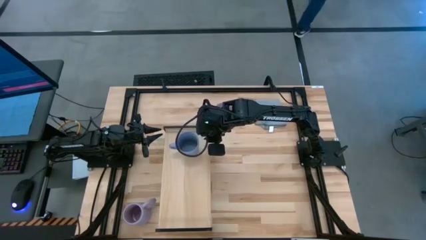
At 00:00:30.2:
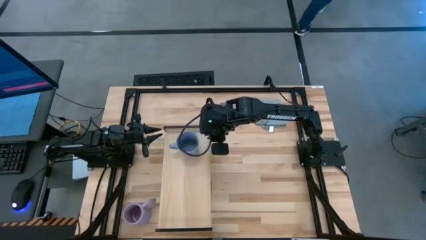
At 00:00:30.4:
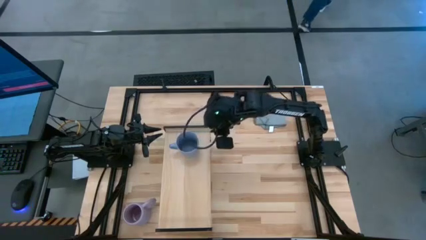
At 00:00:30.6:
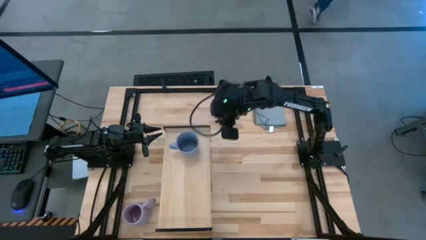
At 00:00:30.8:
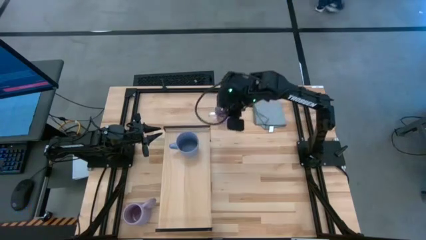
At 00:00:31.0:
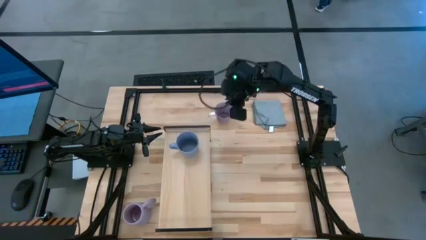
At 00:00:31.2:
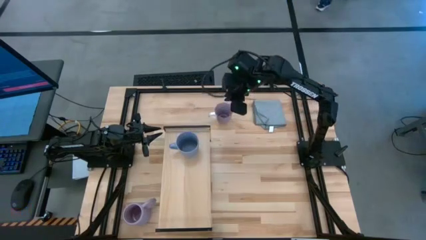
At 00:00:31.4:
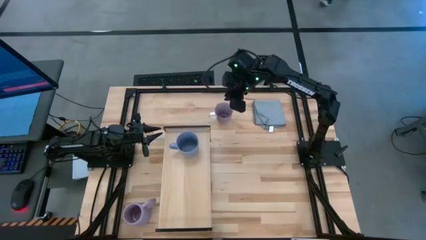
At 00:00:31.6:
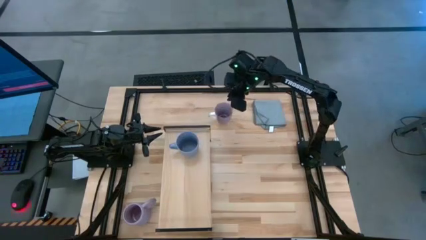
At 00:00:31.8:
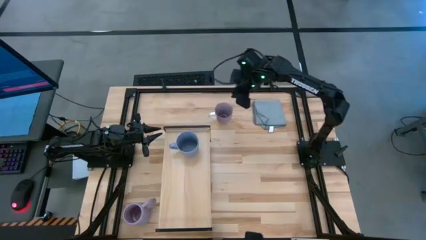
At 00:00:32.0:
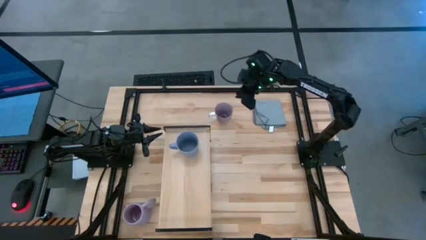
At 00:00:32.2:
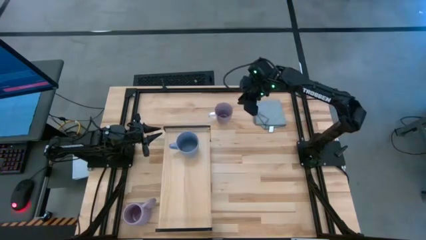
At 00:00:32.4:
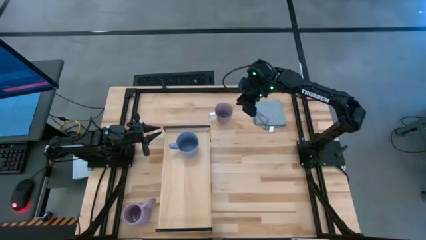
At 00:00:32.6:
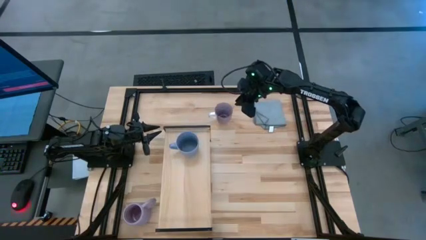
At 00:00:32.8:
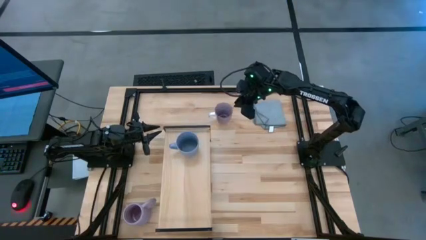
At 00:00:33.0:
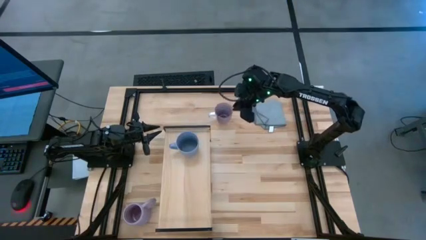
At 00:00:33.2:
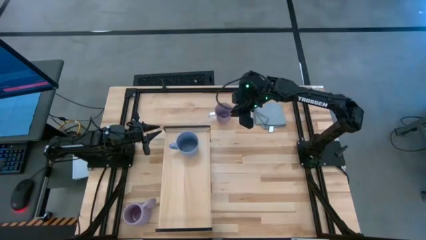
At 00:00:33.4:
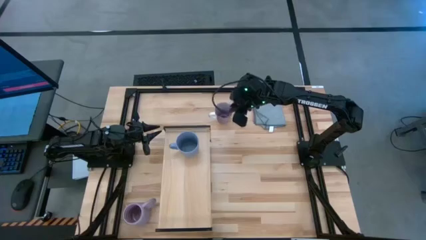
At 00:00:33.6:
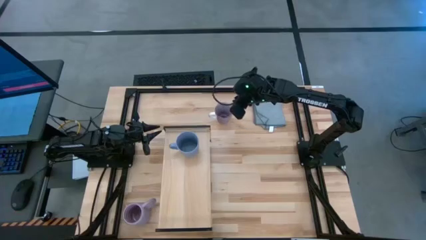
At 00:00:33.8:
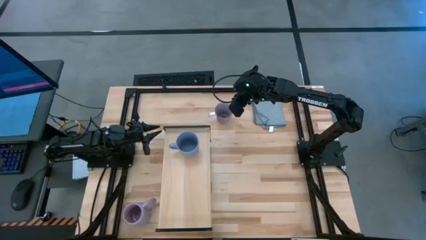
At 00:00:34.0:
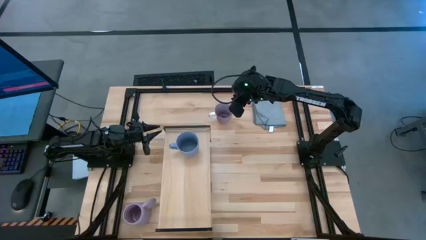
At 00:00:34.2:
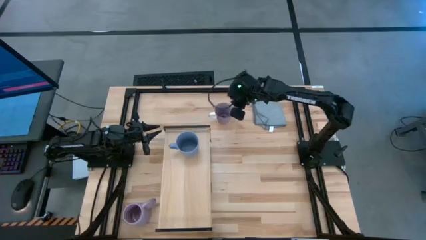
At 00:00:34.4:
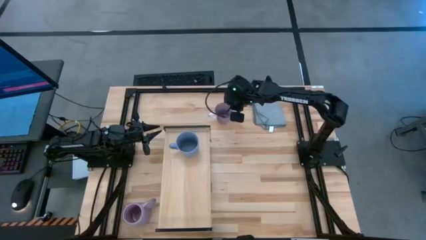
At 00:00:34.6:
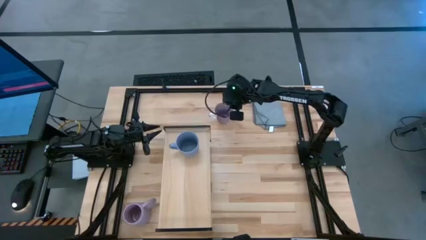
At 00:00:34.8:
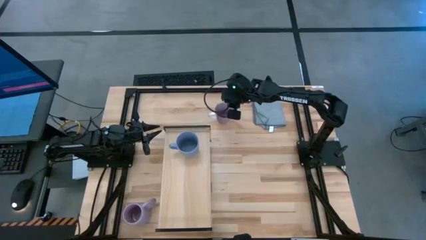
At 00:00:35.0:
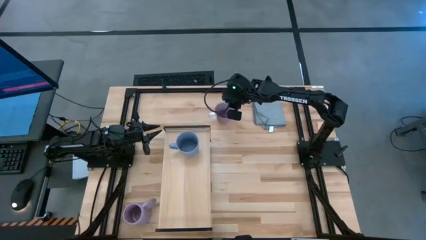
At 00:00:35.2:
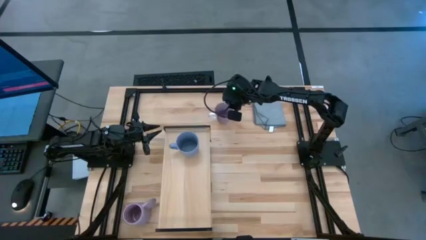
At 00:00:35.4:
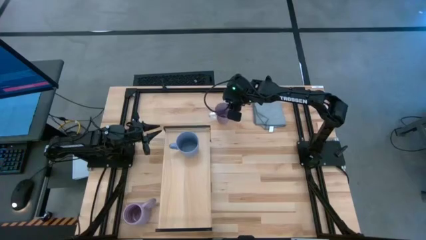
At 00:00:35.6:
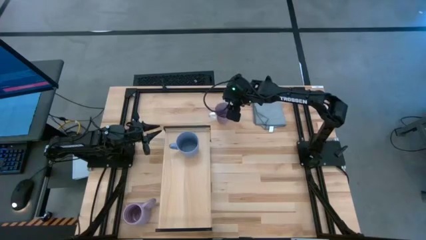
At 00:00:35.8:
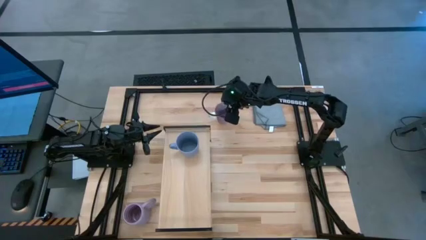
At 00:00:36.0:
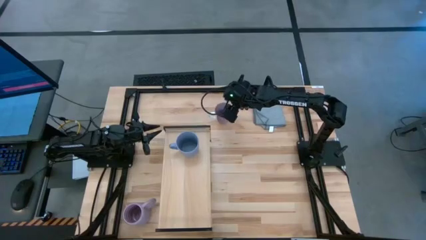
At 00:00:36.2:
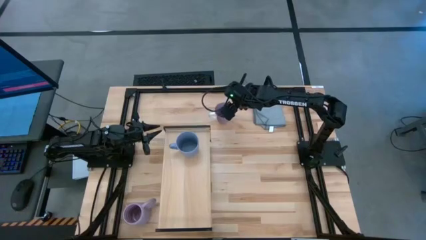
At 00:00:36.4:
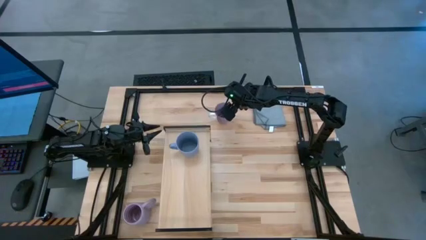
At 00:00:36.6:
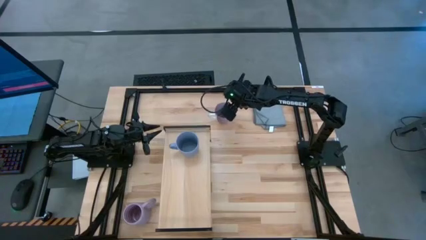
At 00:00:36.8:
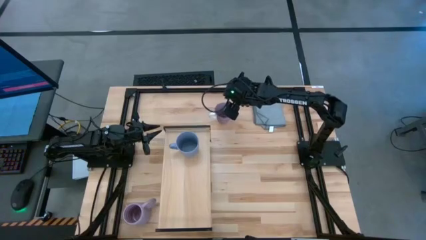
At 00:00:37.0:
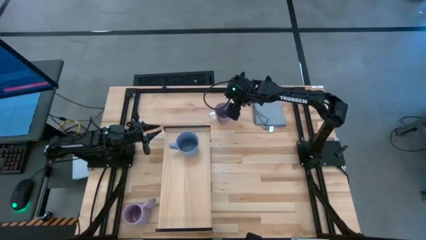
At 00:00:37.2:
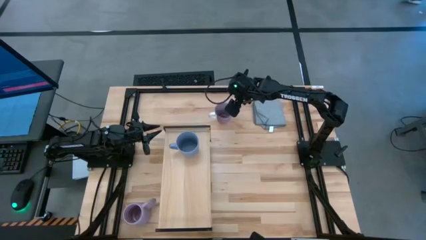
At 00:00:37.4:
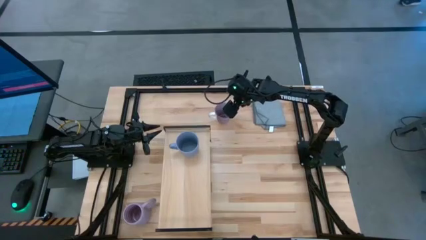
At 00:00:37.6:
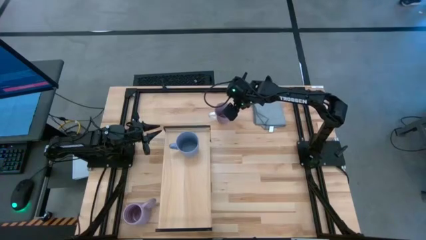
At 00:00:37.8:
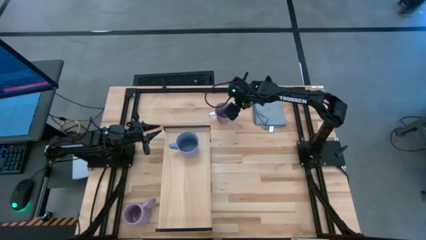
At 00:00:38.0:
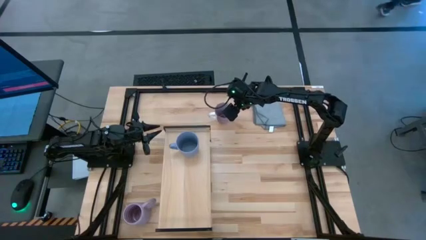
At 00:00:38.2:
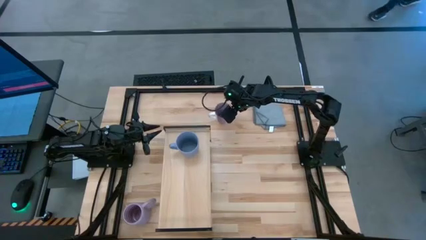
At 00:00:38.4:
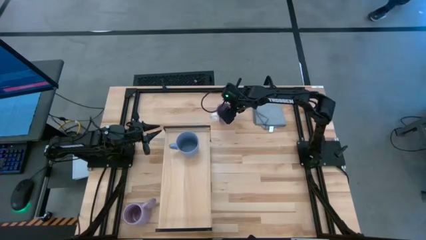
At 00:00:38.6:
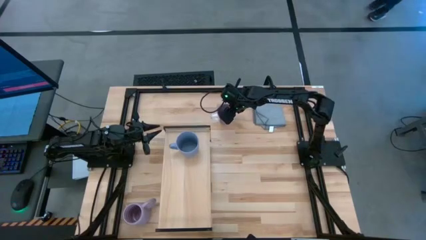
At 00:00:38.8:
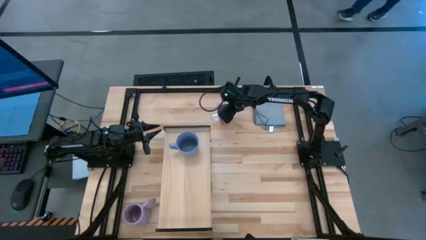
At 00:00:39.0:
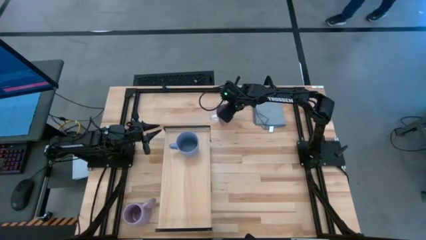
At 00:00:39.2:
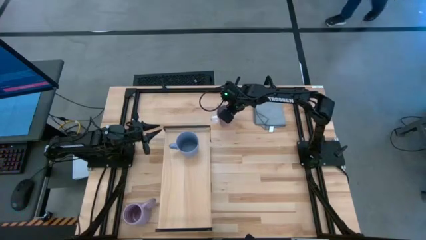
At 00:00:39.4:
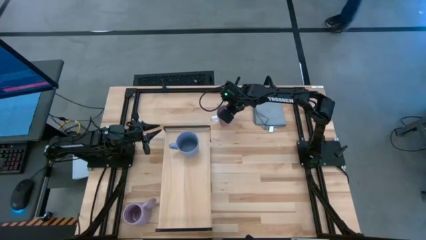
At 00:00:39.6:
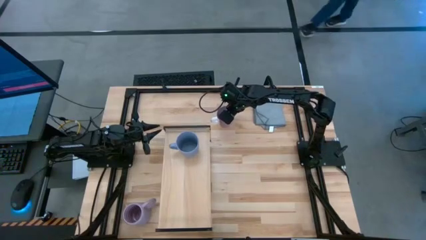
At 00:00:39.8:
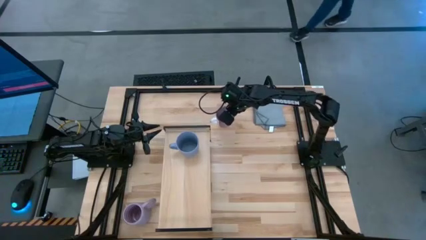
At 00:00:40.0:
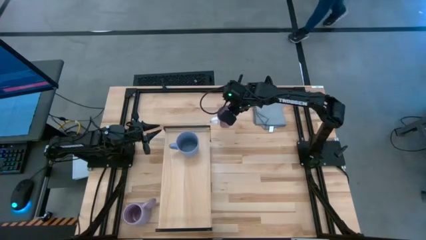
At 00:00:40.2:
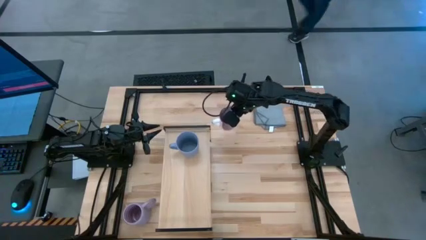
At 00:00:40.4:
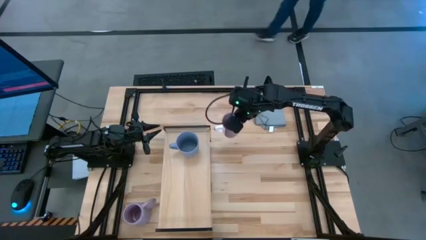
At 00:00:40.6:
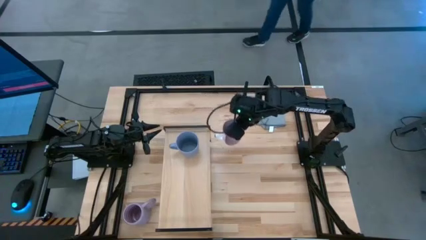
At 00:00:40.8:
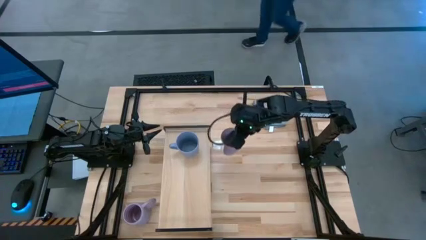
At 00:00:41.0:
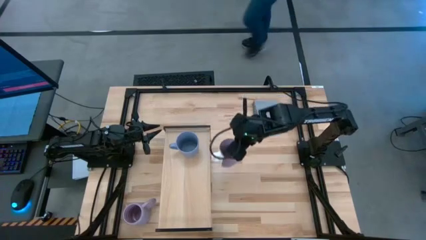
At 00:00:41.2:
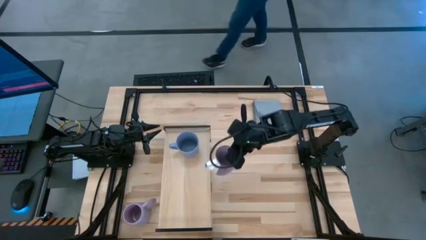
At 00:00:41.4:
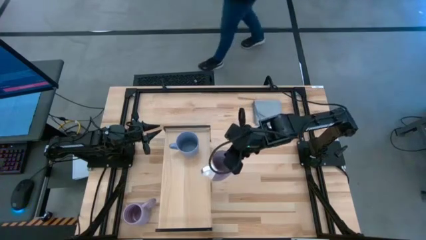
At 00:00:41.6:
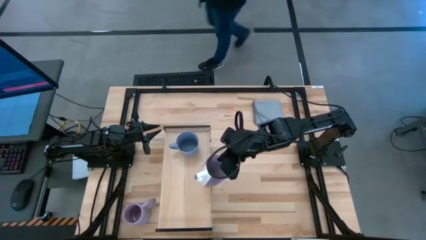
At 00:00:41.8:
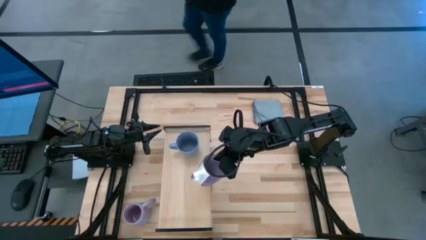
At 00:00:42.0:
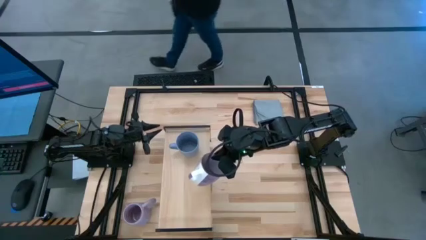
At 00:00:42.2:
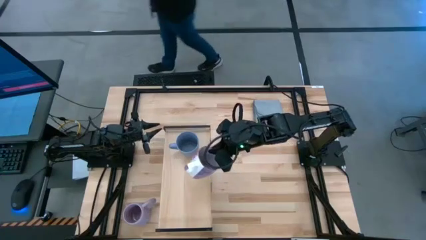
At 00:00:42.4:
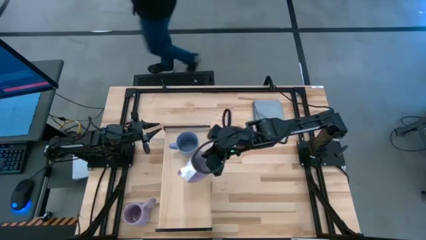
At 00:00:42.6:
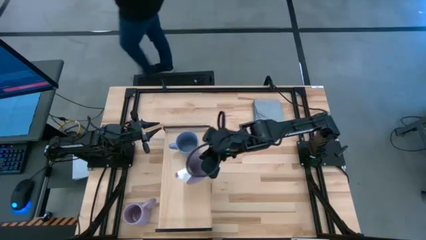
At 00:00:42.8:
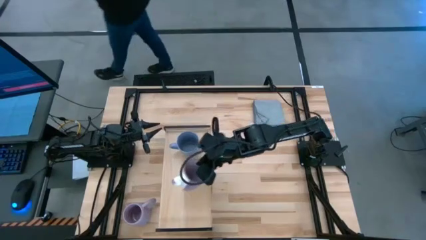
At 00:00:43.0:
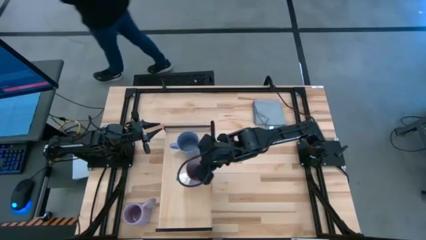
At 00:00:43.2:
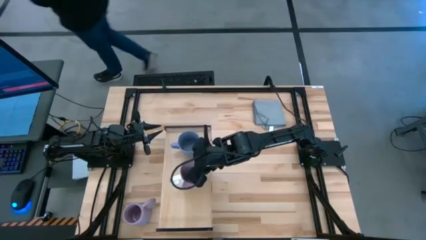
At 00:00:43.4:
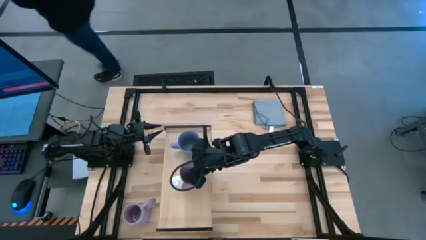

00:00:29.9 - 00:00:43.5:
Task: Stack small to large cups/mugs on shelf
Put the purple patterned mug on the shelf
